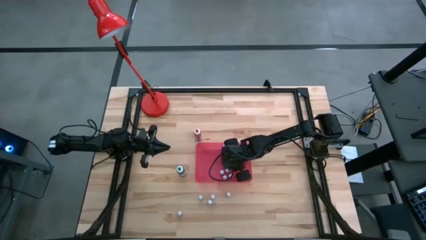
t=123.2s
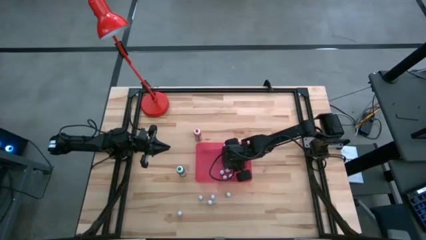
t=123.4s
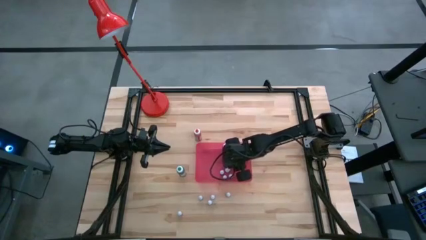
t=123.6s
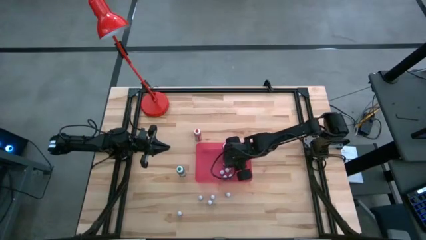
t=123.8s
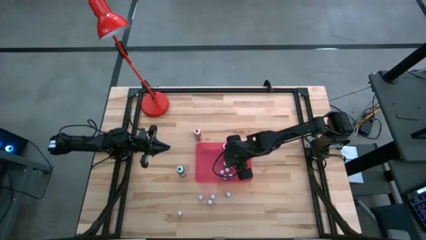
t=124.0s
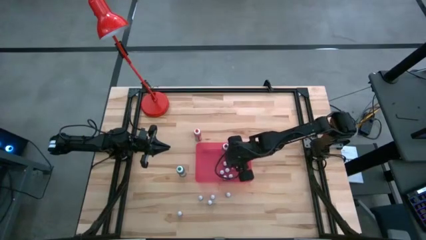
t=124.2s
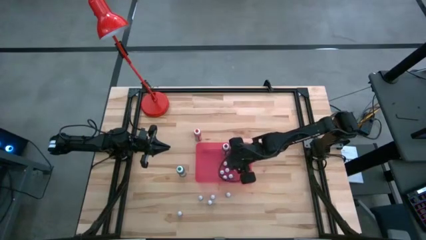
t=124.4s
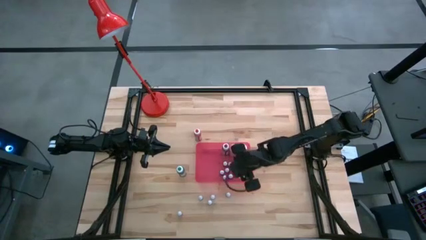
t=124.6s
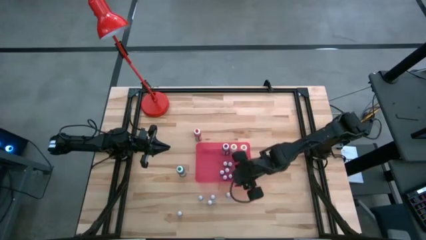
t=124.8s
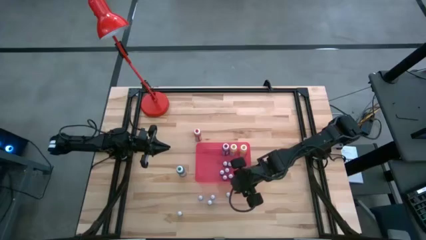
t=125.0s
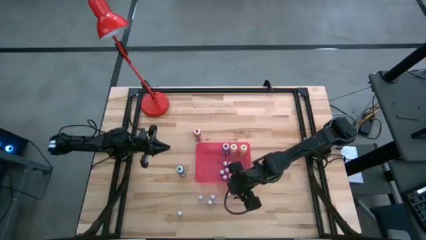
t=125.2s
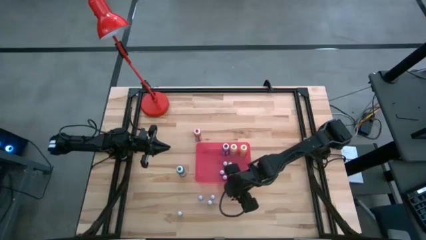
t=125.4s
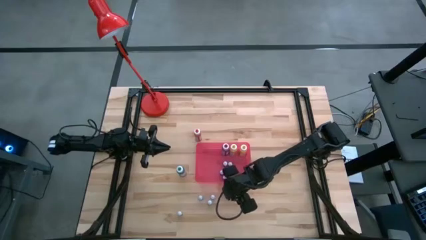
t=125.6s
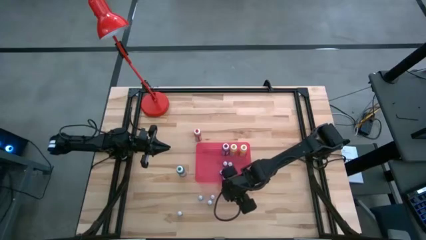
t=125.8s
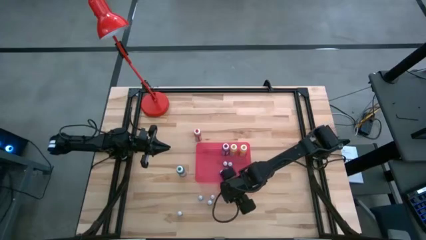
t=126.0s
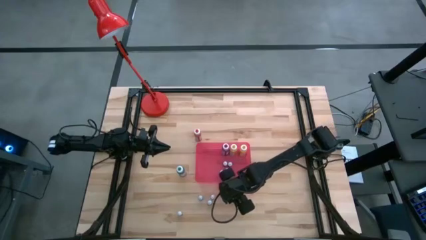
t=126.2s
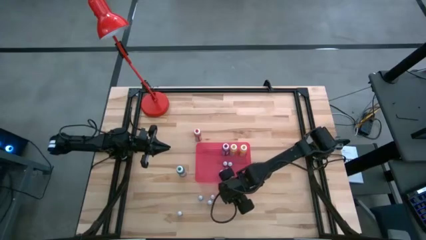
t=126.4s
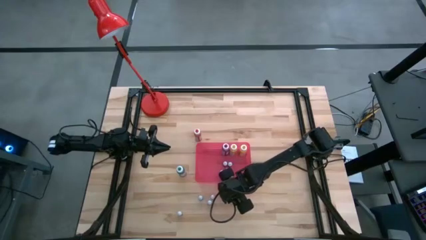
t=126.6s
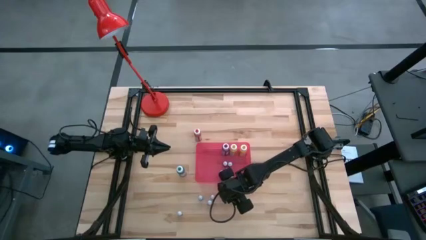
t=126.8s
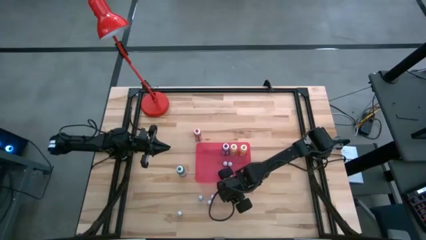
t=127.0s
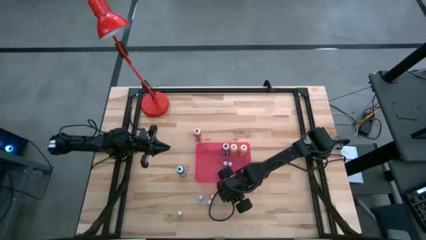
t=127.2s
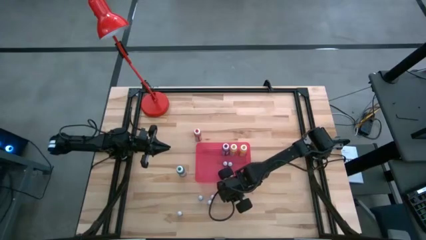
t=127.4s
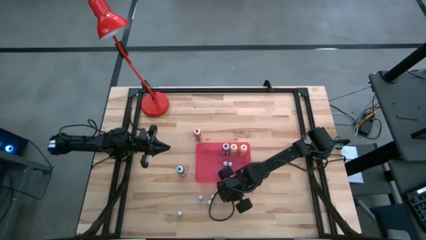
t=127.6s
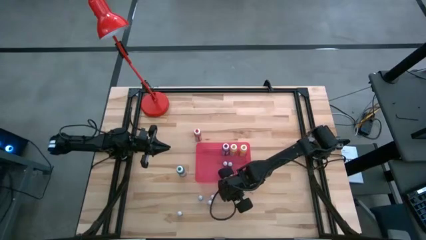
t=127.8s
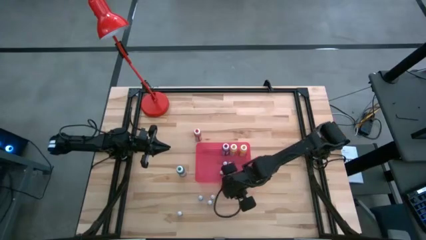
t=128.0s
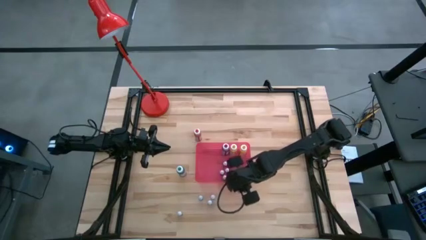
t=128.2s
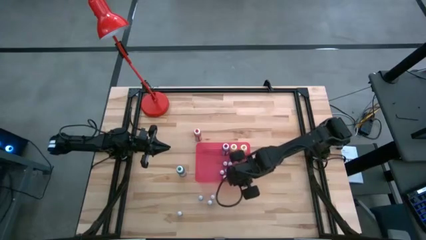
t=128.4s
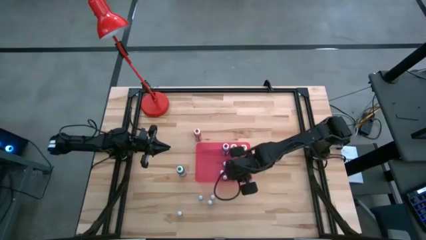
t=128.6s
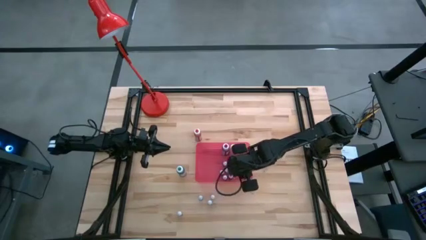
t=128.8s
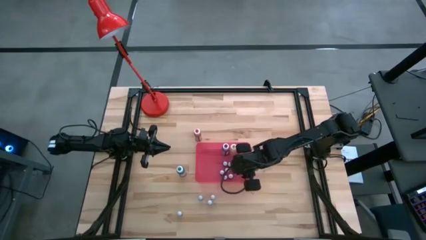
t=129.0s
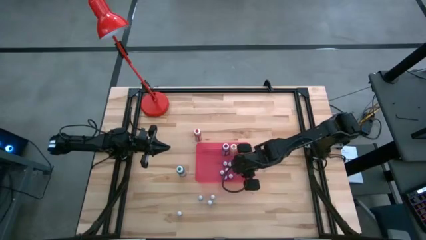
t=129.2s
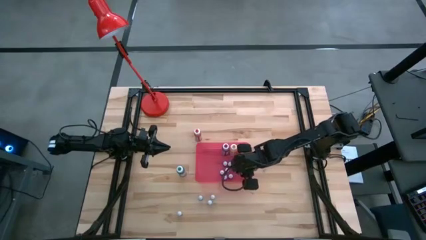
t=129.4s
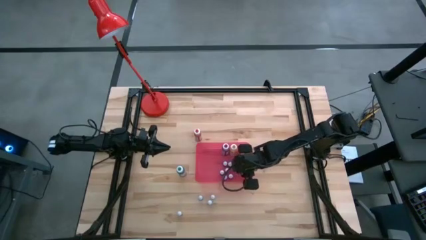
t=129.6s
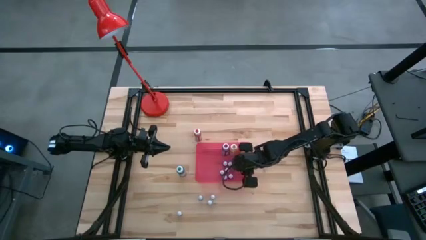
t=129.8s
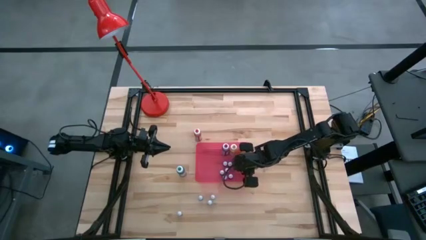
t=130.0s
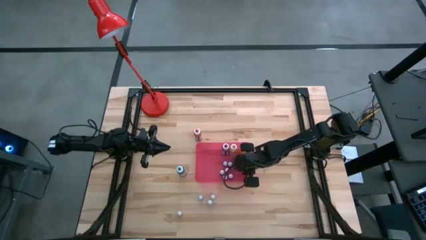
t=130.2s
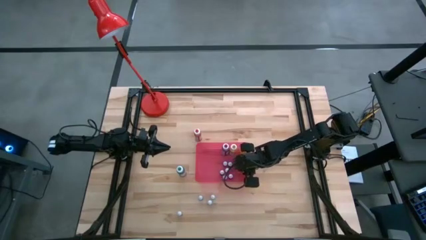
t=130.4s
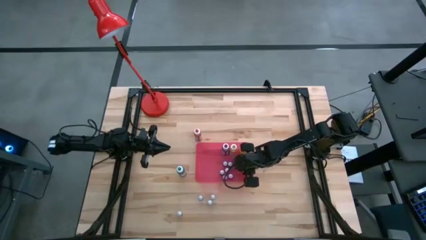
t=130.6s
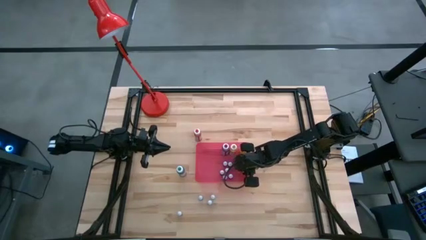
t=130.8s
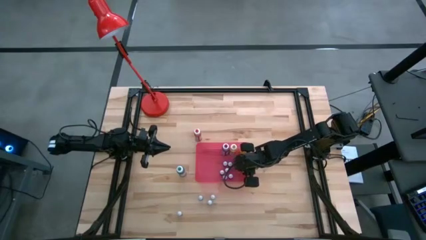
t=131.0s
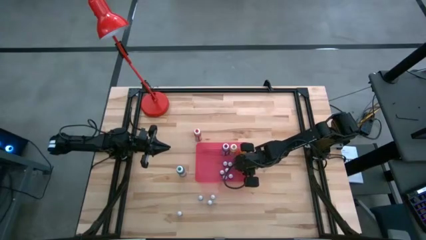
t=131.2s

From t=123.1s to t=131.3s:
Task: Pick & Place food coloring
Put the small blue food coloring bottle into the container

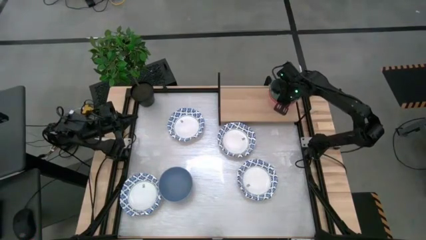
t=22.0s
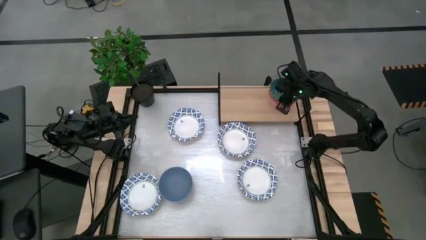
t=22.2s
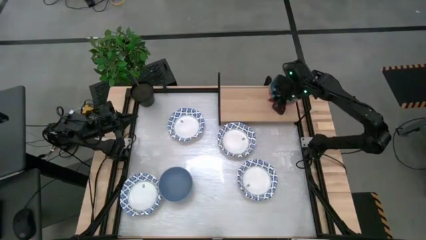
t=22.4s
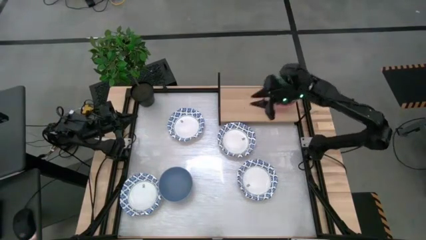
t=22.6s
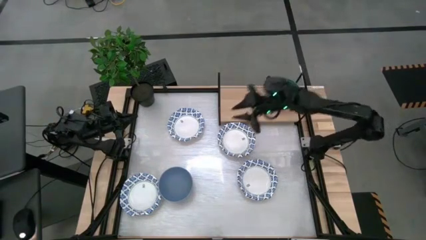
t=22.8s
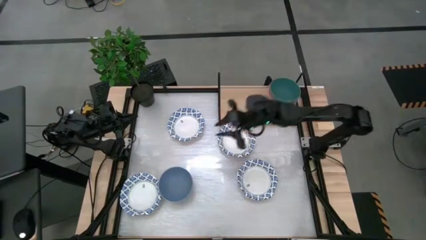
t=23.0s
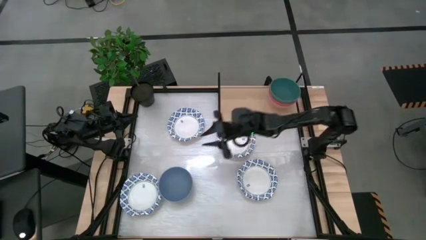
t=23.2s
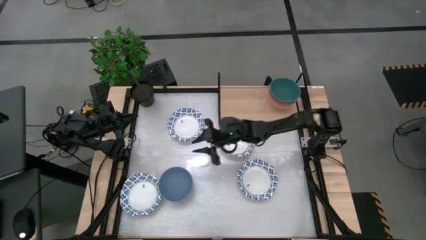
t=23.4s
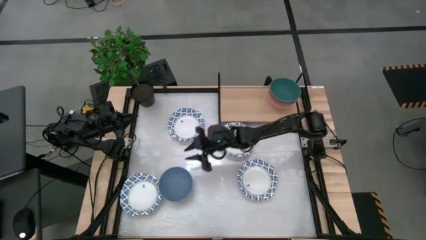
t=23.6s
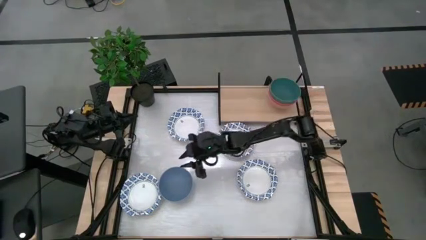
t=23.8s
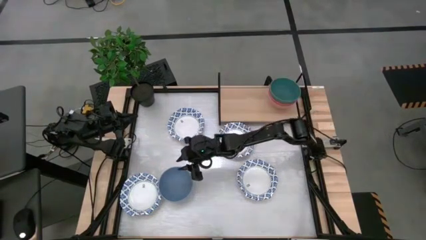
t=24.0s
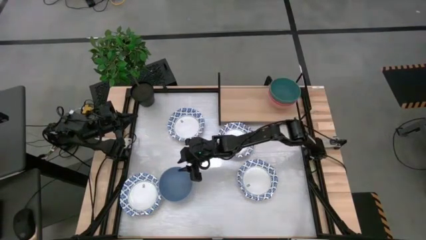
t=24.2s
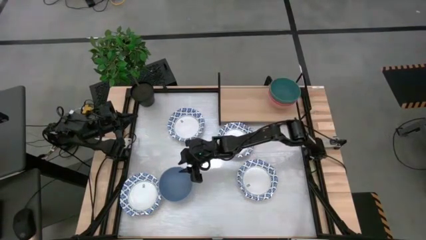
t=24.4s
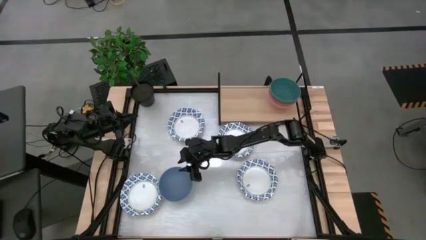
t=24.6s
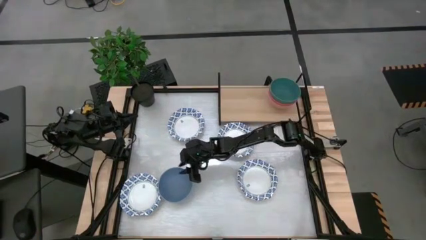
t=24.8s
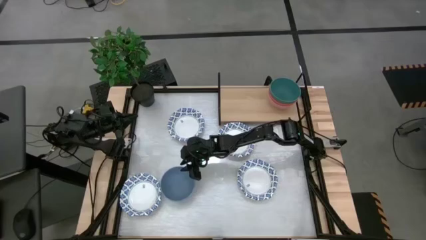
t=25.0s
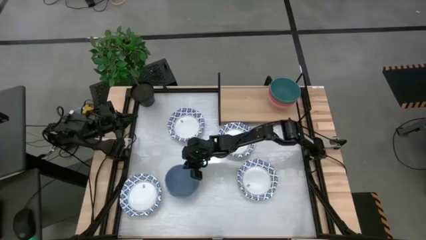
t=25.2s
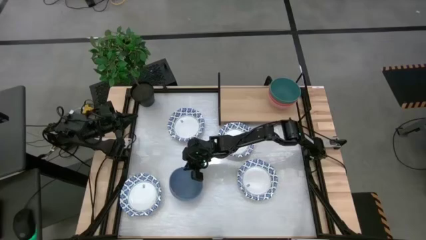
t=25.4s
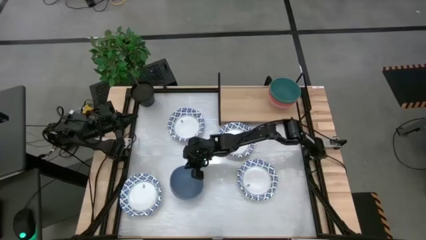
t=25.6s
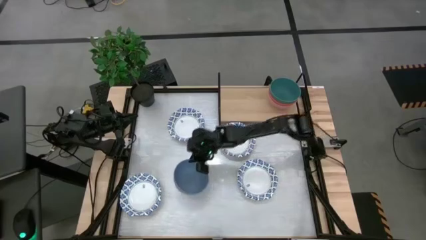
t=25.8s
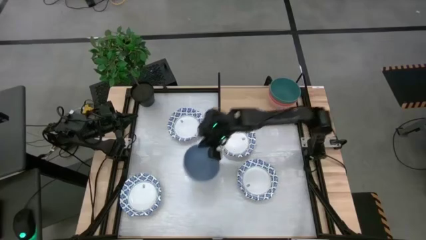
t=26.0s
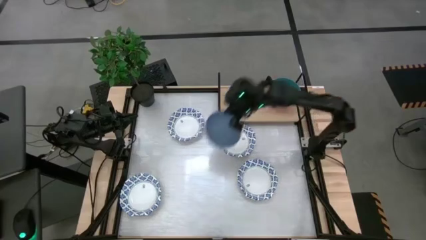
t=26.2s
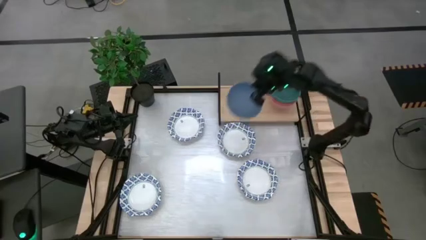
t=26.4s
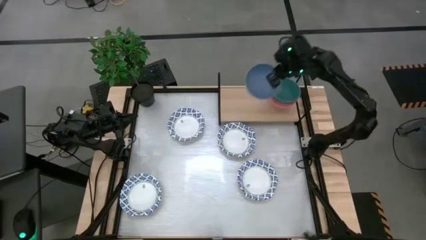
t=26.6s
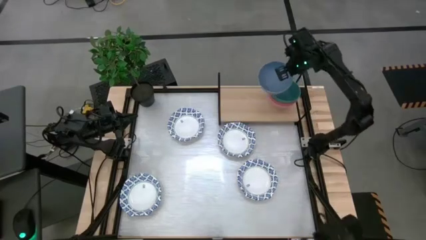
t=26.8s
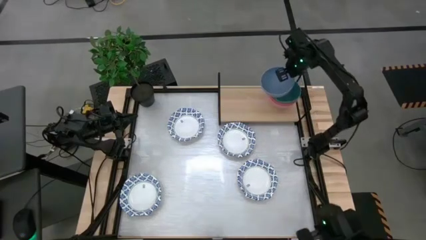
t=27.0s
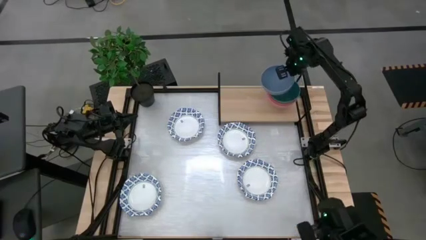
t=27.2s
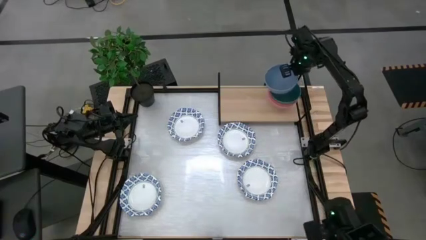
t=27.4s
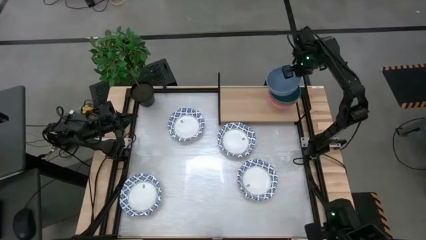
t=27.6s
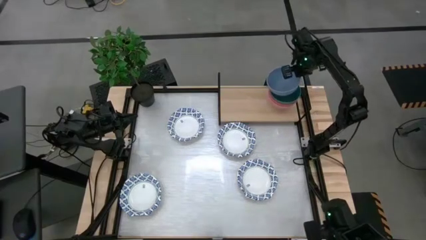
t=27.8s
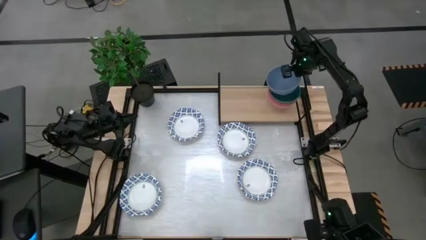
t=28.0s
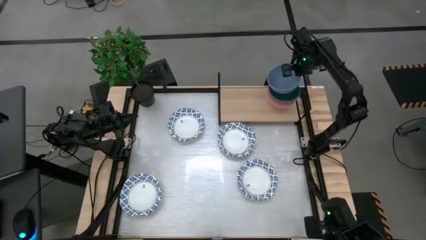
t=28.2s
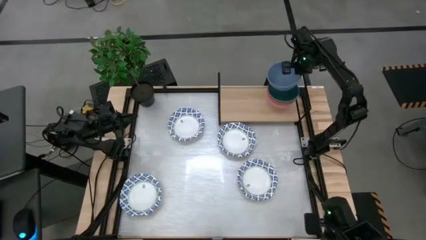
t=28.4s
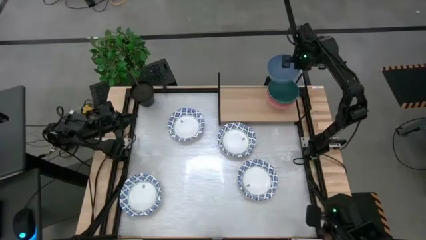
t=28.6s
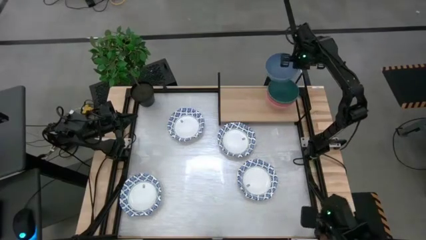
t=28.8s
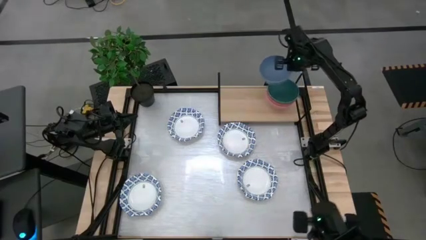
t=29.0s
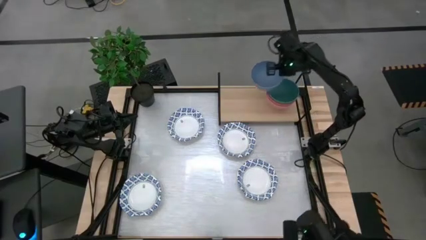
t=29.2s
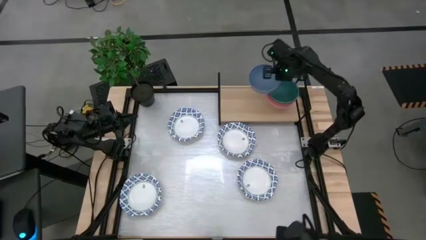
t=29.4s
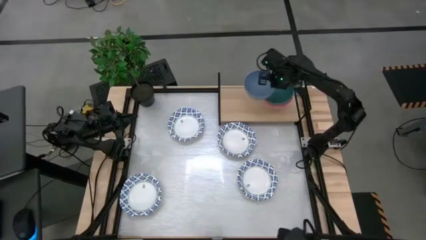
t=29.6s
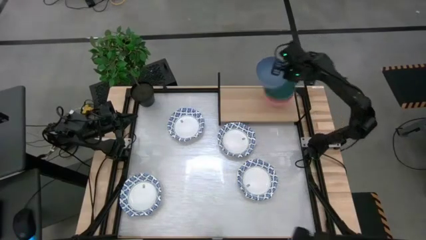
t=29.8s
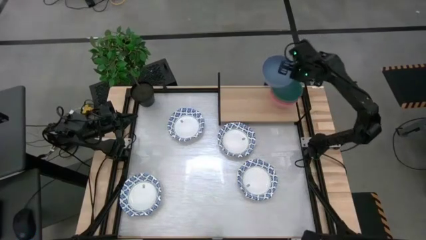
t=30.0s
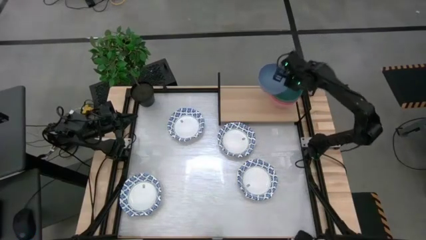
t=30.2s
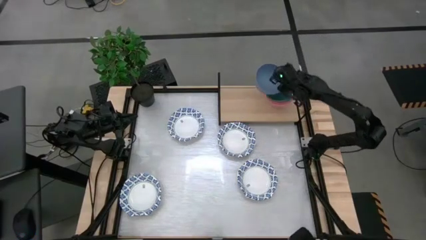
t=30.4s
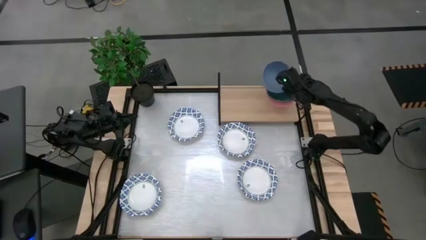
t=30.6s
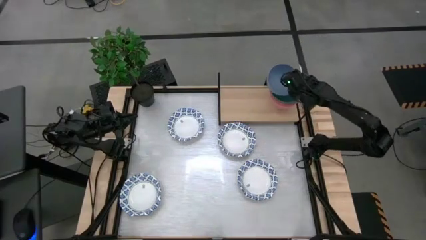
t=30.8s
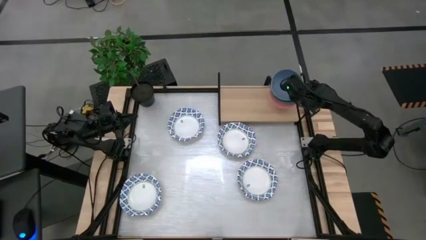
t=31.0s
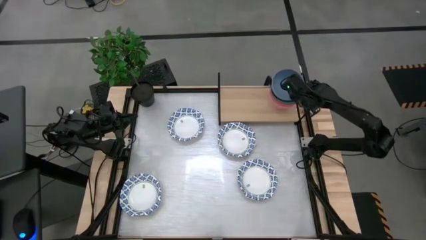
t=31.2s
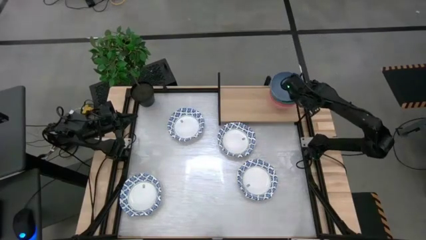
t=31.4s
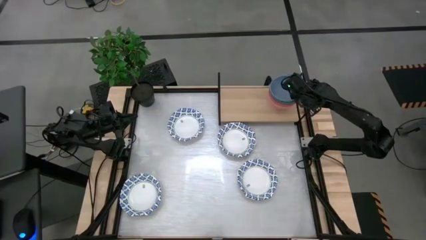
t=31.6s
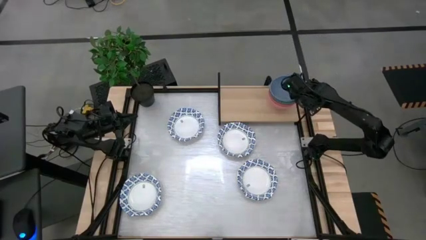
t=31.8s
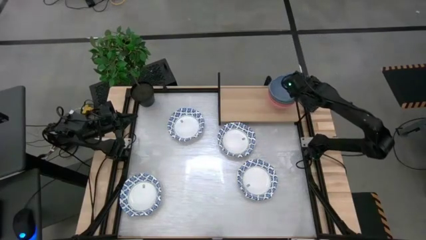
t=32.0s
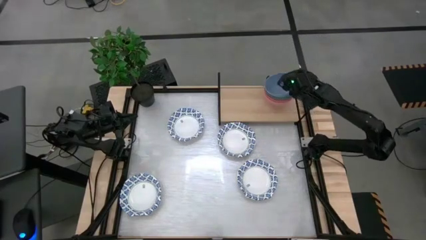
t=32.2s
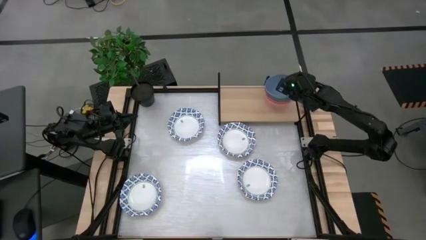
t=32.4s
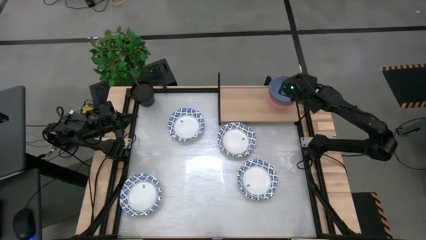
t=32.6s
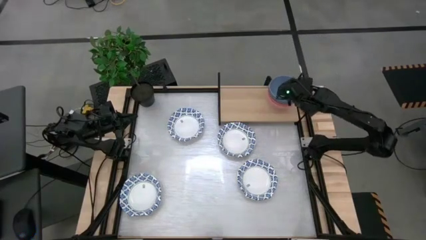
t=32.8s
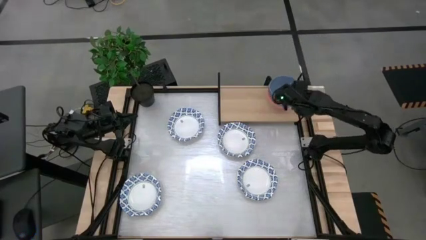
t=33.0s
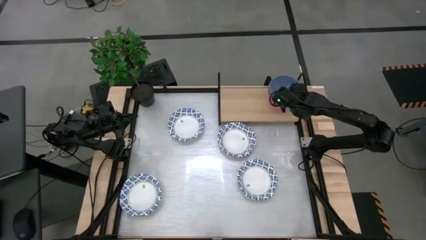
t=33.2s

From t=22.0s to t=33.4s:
Task: Place and stack bowls onto a shelf
Stack the blue bowl on top of the green bowl on the shelf
